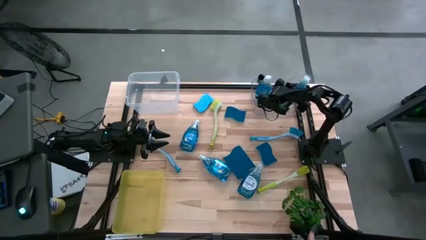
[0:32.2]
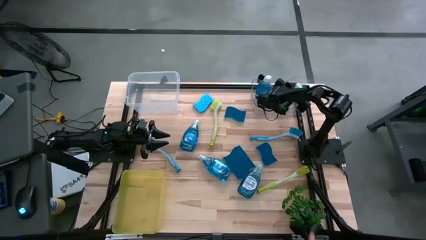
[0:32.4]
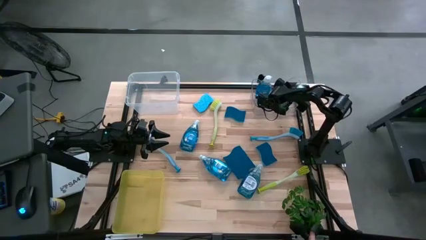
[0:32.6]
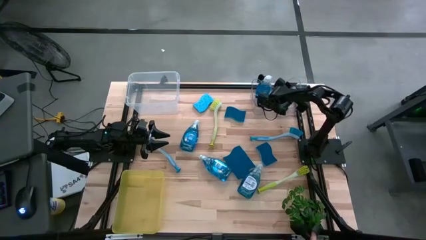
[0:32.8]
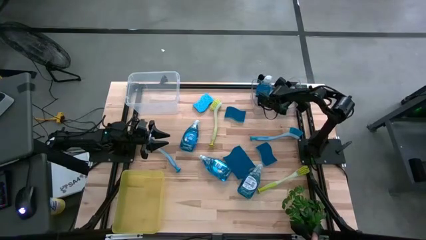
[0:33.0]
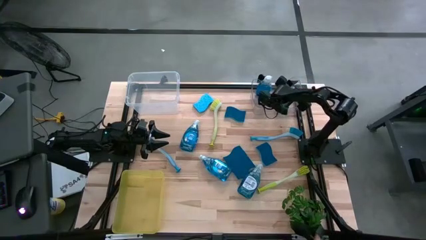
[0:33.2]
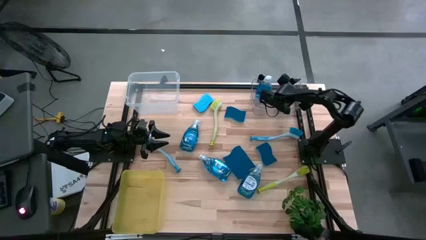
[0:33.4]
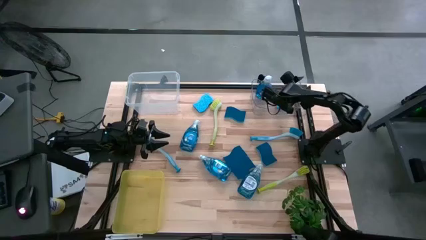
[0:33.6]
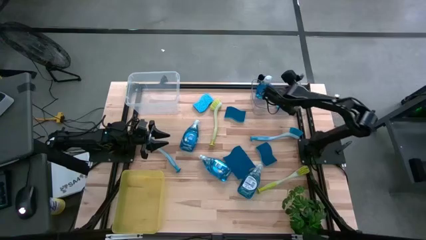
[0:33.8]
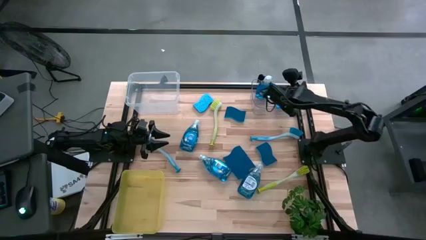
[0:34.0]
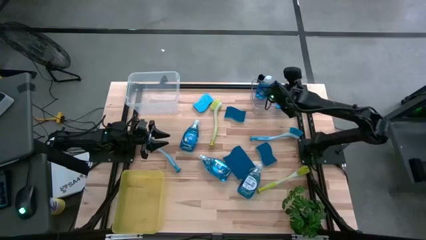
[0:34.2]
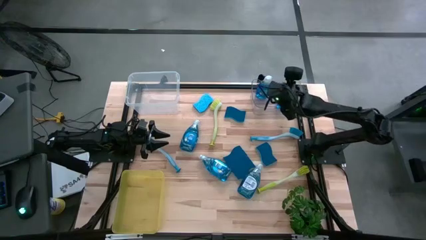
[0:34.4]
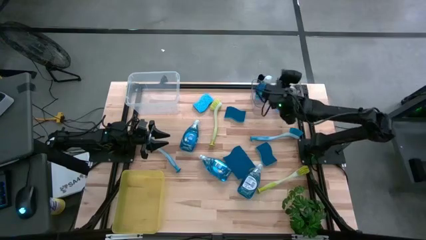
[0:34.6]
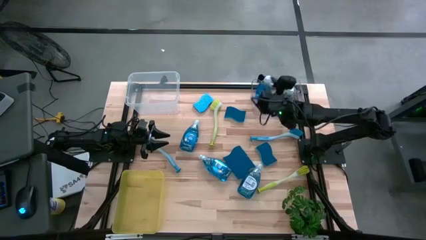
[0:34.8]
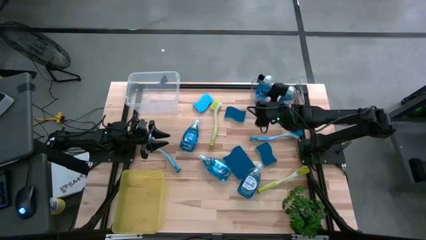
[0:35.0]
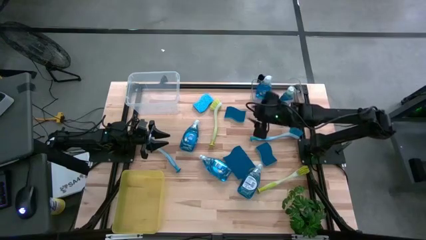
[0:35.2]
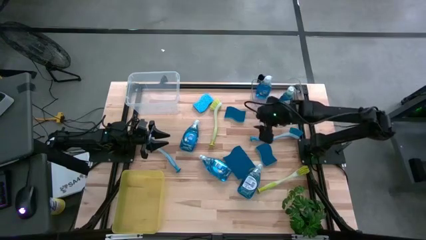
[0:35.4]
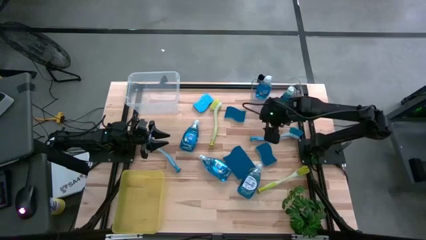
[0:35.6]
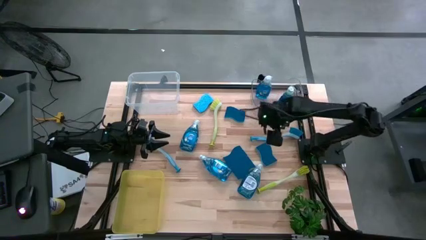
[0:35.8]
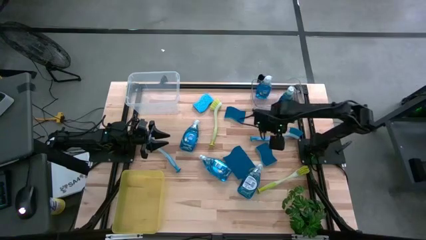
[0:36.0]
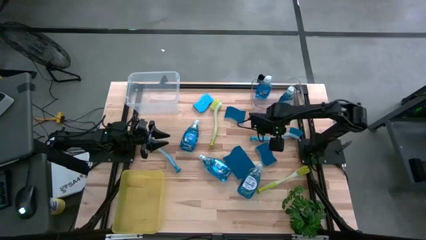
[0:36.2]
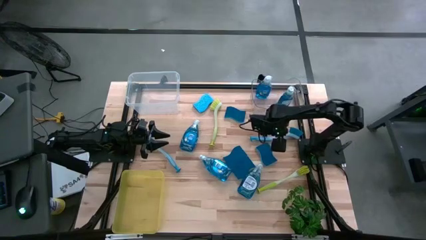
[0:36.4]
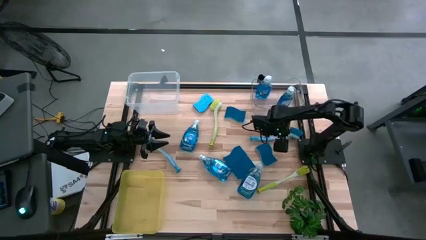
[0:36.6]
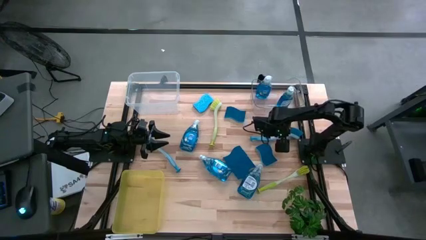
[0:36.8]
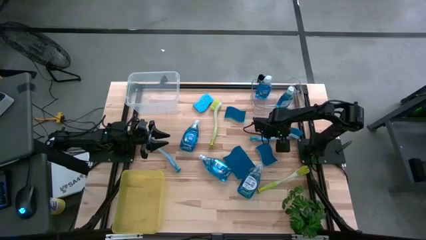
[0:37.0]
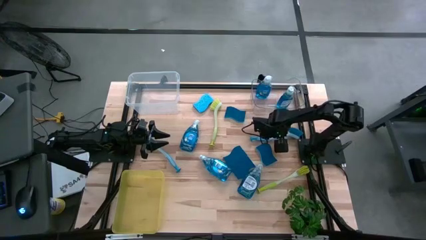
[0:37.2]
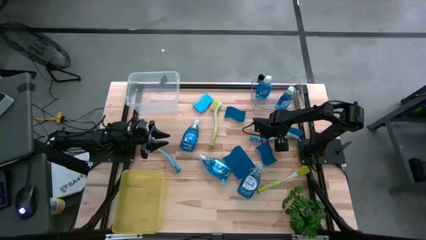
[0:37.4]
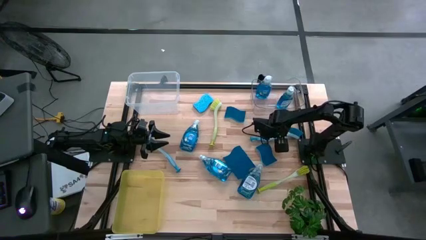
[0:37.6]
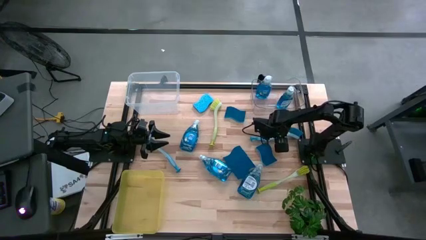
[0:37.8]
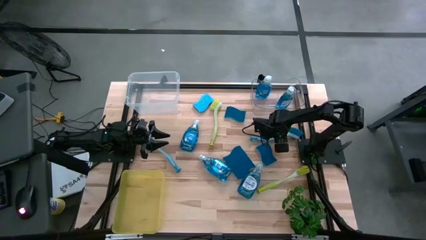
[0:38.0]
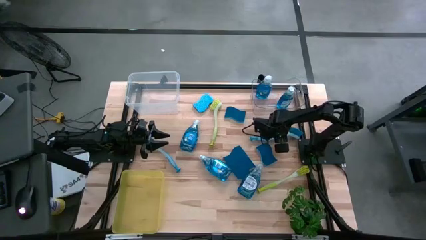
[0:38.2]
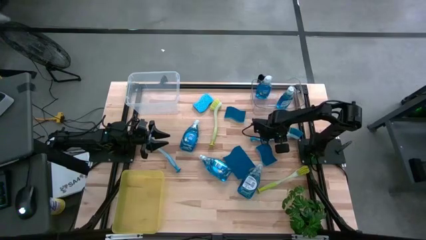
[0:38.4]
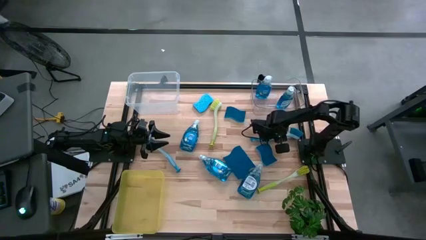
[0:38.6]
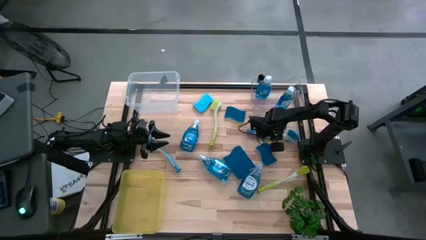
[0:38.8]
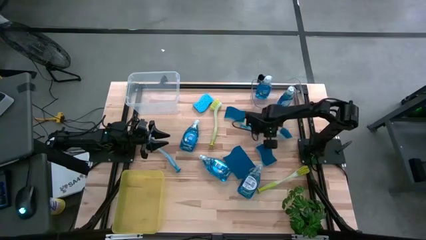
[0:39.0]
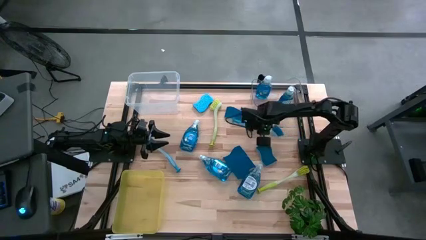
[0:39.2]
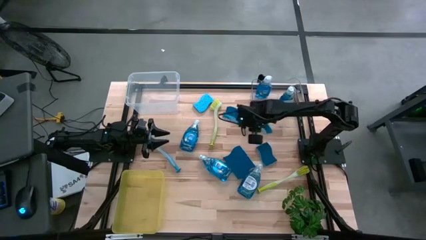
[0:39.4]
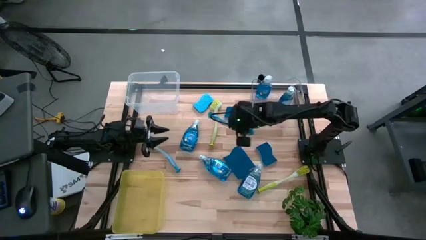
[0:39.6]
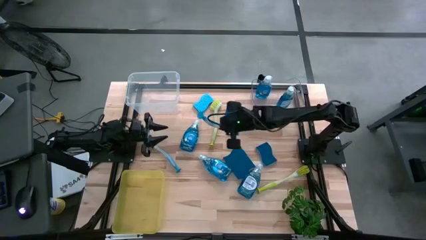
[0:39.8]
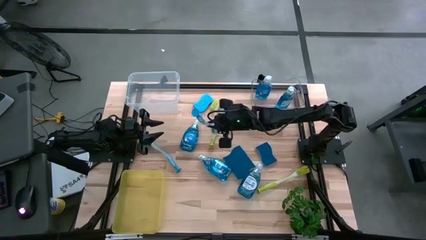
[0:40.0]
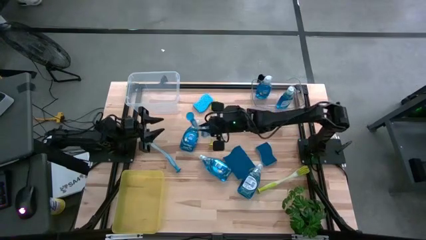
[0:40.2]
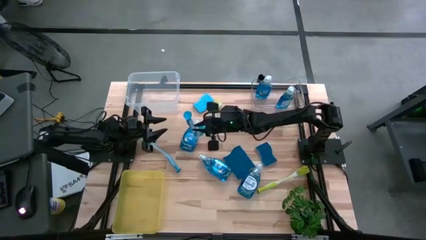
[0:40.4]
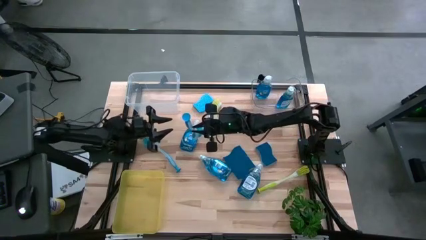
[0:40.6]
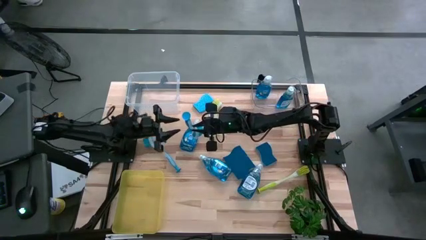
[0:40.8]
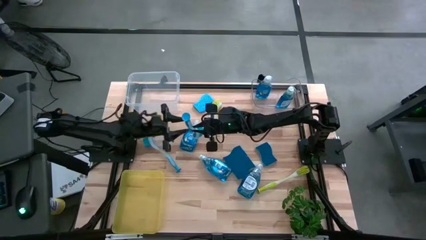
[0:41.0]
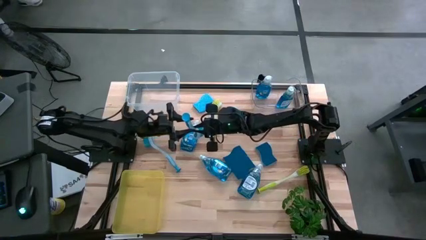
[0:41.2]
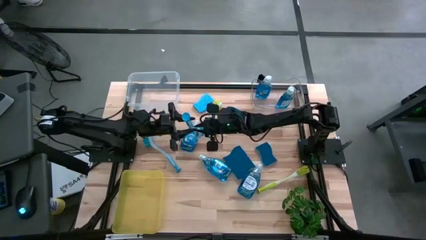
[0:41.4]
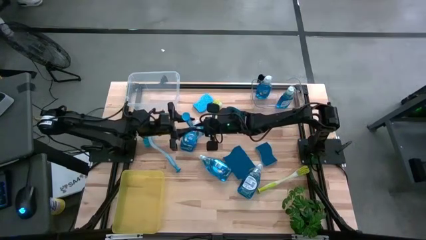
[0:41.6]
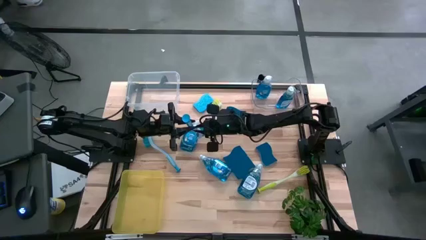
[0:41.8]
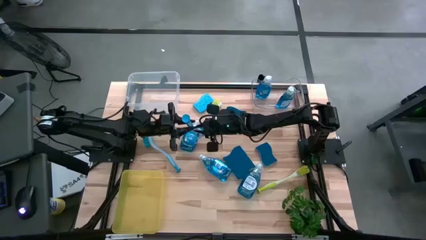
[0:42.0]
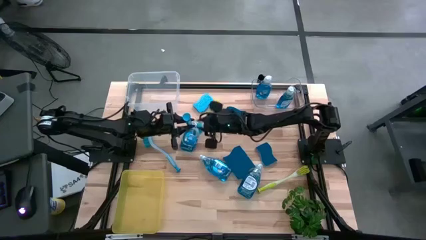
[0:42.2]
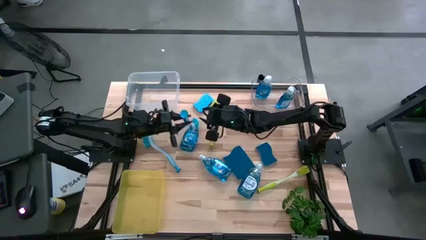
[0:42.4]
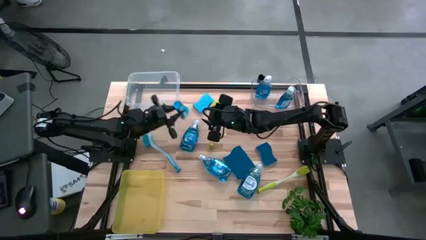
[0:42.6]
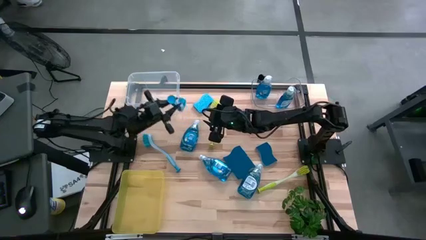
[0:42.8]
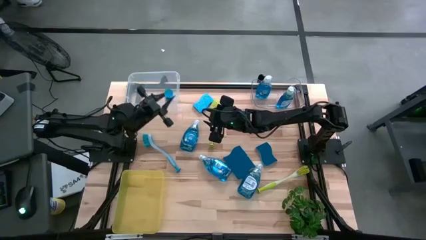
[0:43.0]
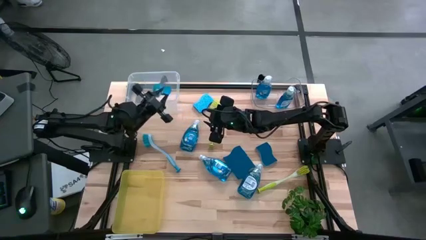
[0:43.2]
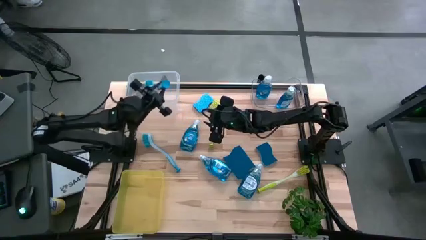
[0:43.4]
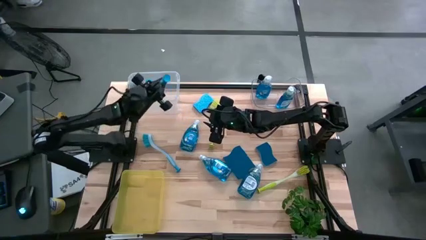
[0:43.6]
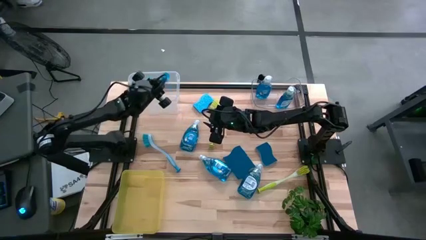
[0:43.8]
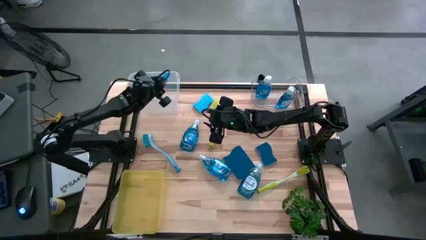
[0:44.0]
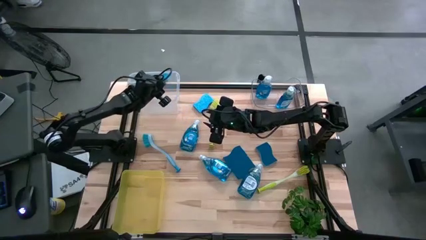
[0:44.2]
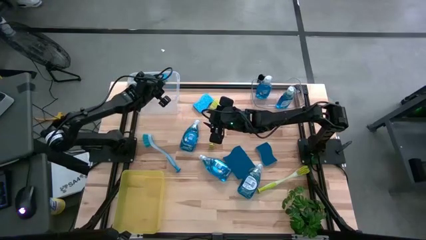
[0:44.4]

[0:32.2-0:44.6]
Task: Pick & Place Kitchen Sink Supplies
Put the right blue dish brush into the white transparent bin

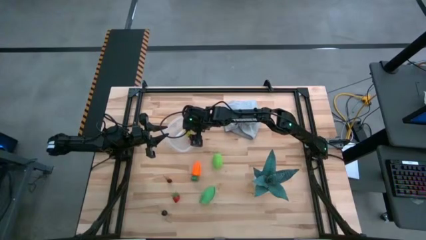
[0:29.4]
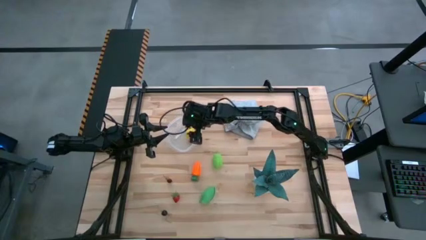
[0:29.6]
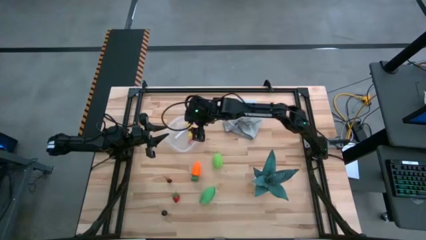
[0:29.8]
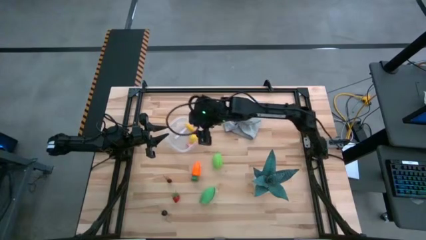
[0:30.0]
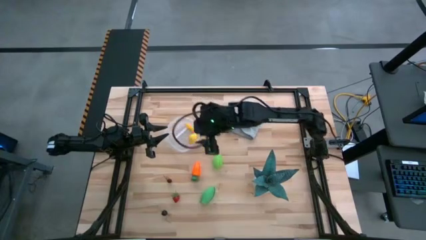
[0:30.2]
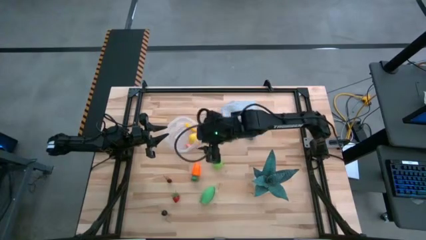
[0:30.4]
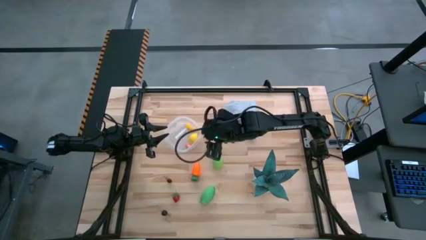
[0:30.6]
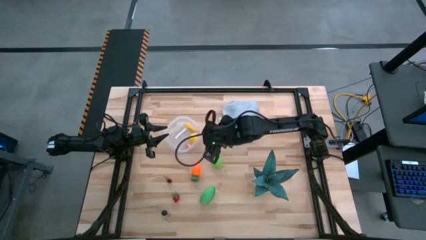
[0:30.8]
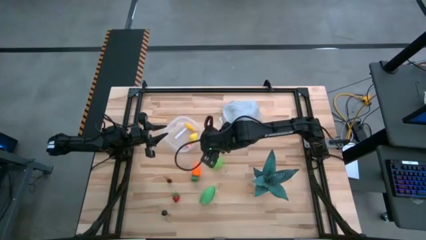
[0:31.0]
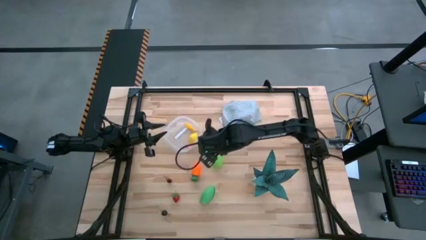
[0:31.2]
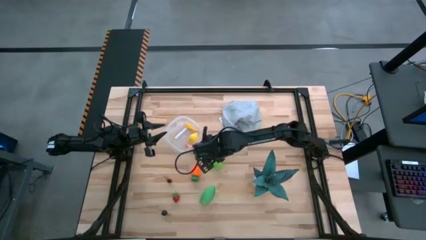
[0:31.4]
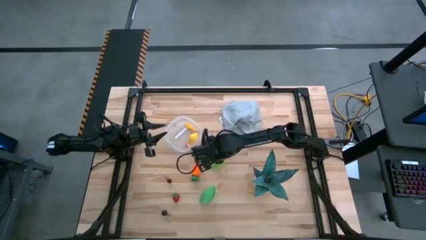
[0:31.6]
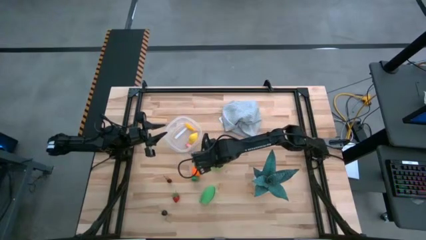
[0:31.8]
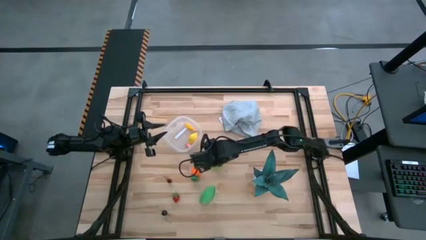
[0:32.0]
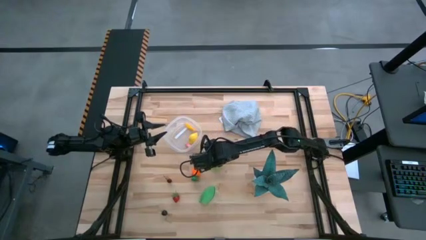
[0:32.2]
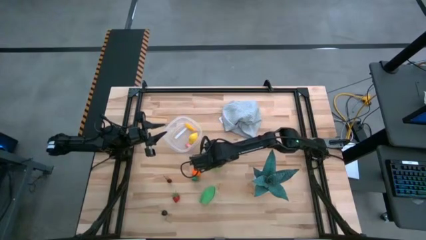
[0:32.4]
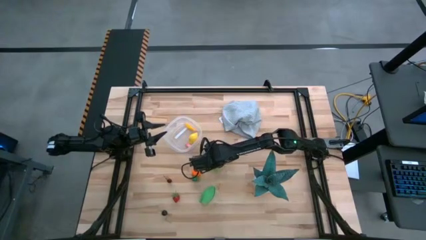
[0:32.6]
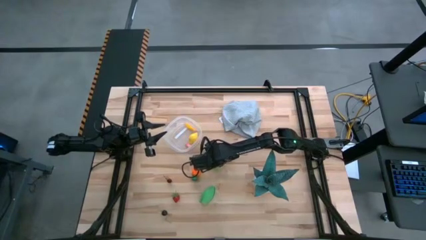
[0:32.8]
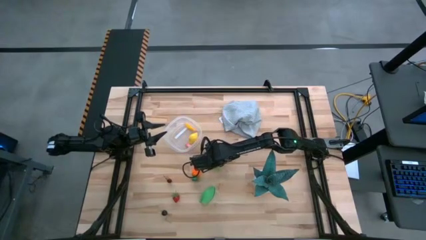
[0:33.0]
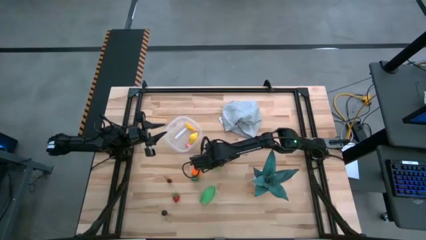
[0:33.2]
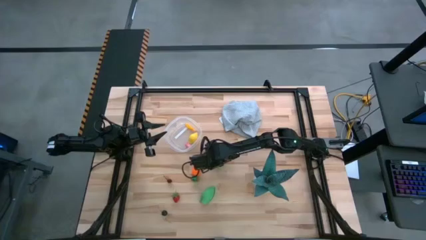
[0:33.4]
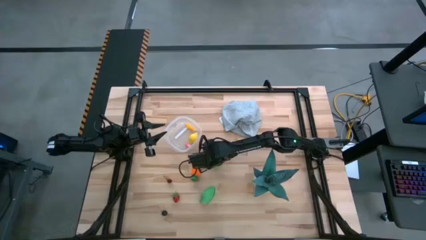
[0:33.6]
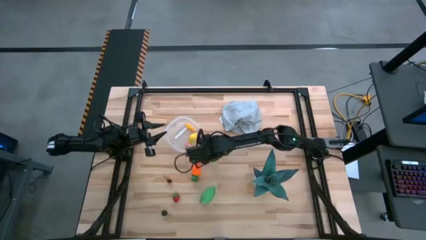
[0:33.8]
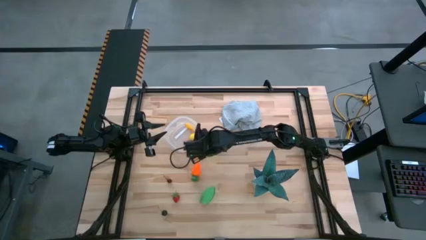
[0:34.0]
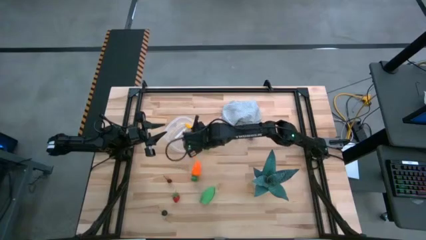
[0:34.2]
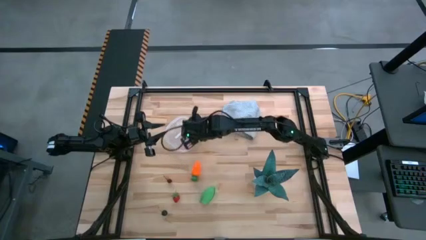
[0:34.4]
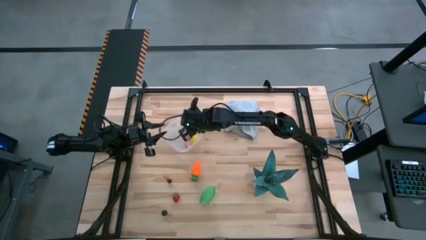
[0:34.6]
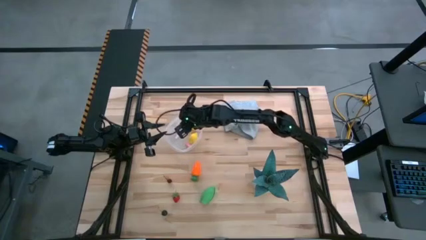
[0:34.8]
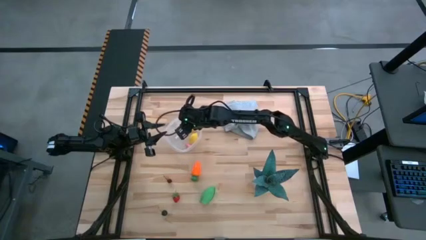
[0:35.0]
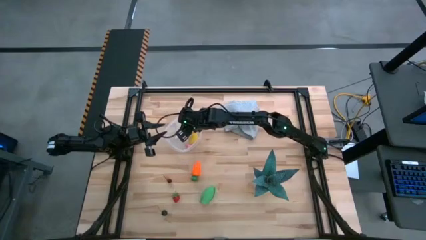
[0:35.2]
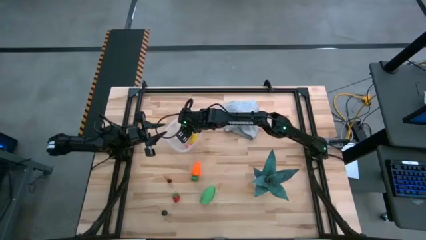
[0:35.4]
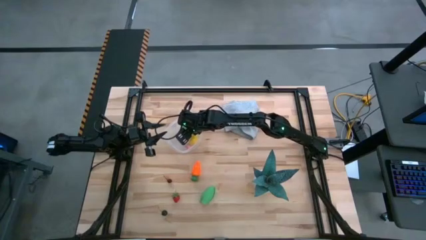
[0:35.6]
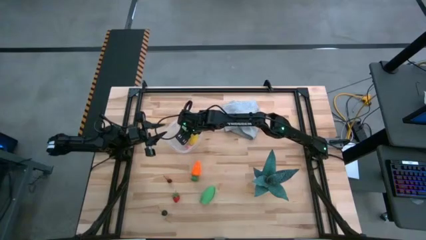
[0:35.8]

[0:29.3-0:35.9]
Task: Pick and placing Produce into tupperware
Put the green melon into the transparent container
